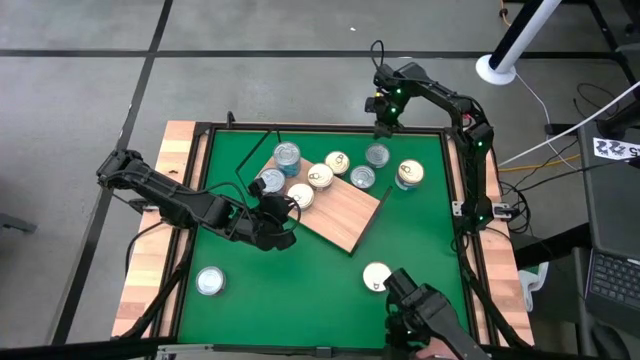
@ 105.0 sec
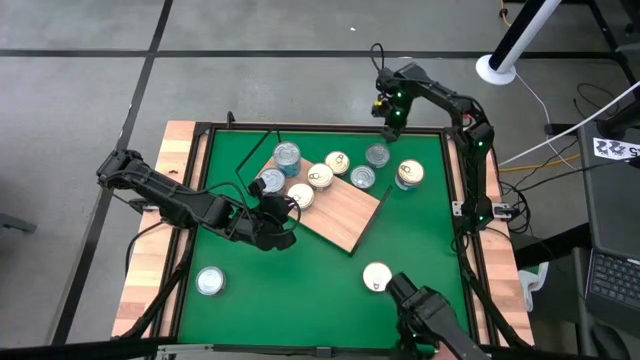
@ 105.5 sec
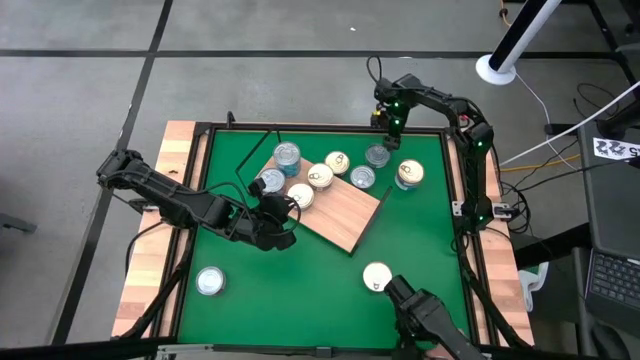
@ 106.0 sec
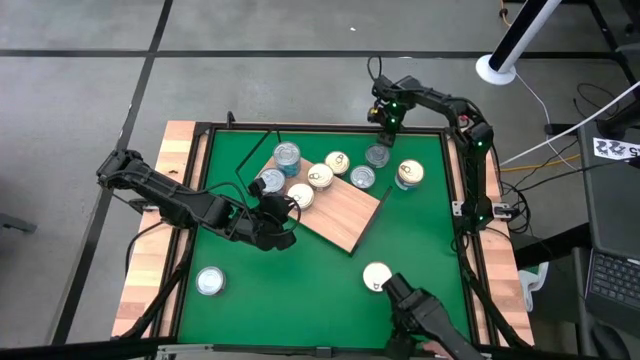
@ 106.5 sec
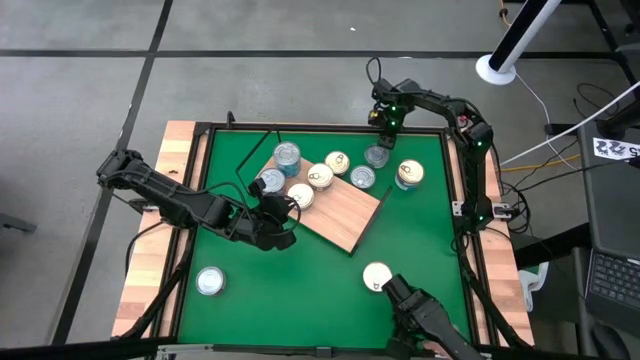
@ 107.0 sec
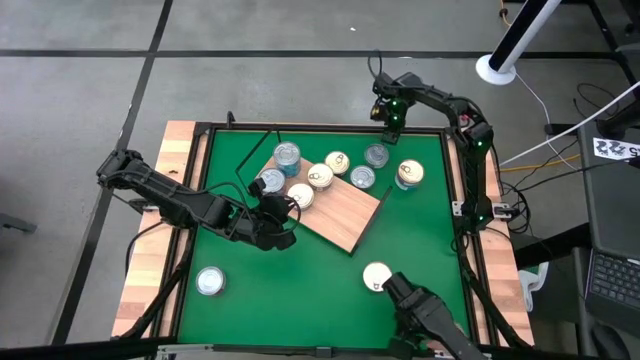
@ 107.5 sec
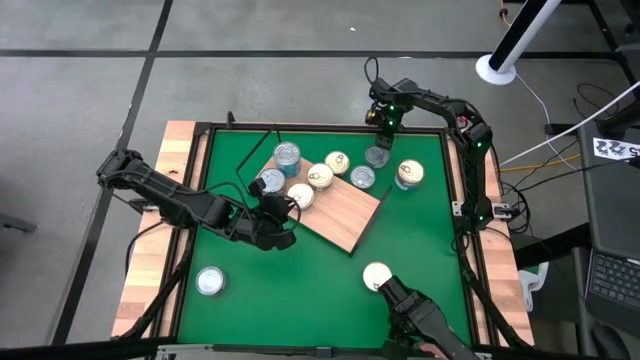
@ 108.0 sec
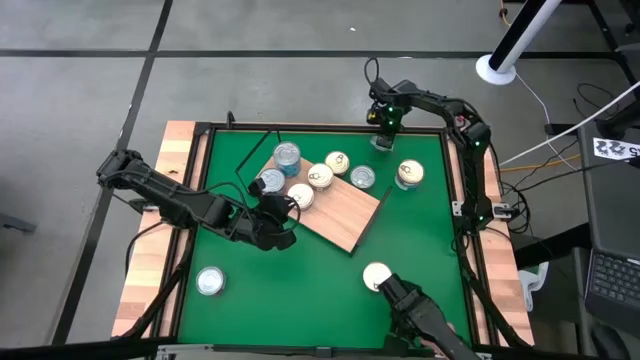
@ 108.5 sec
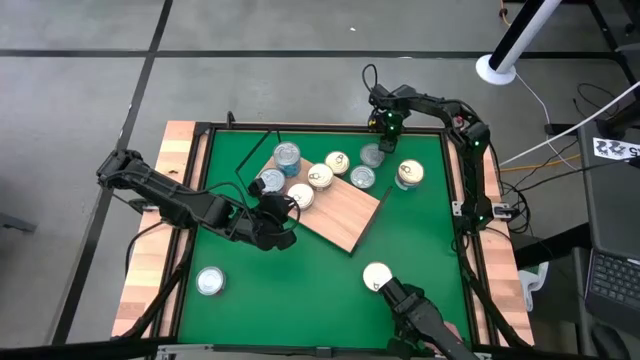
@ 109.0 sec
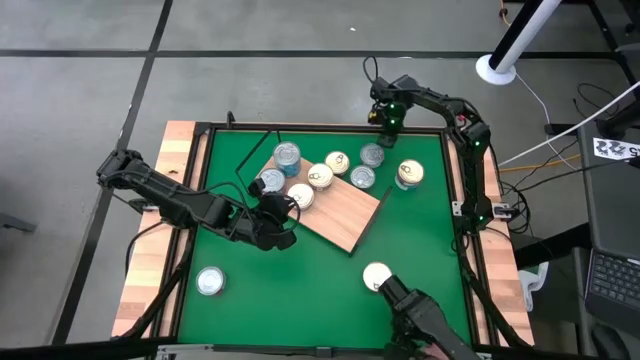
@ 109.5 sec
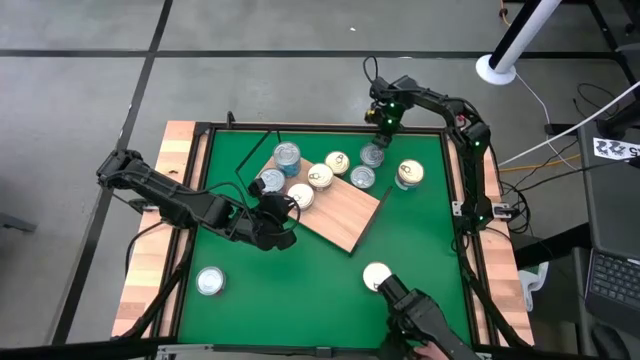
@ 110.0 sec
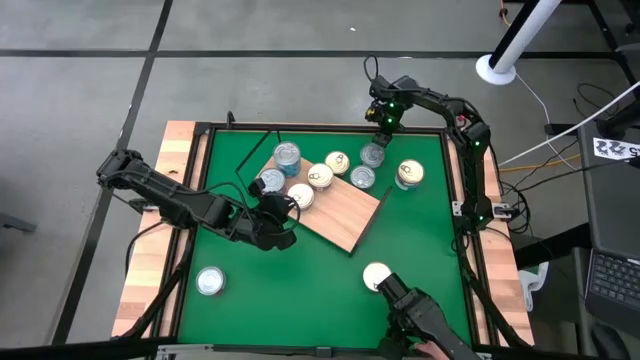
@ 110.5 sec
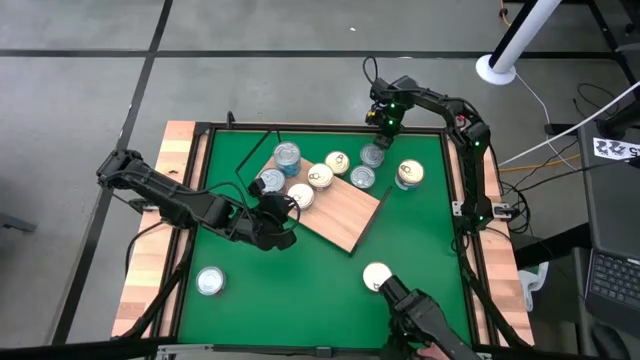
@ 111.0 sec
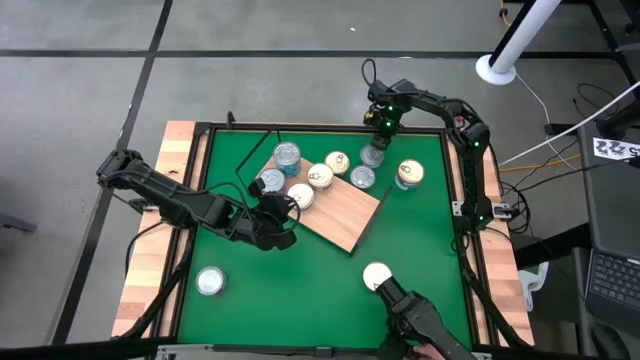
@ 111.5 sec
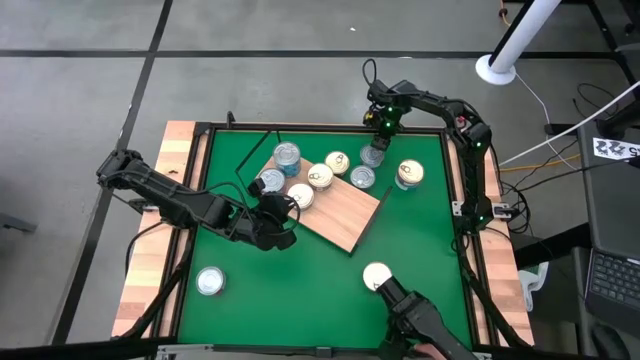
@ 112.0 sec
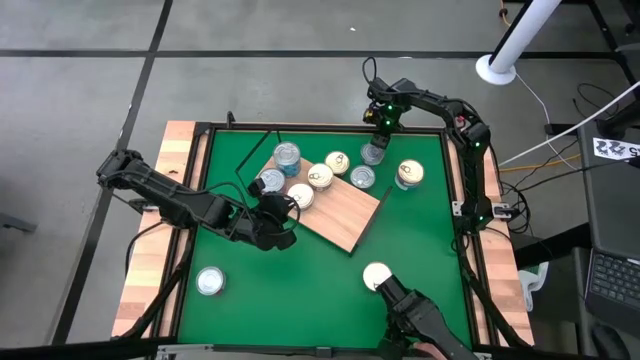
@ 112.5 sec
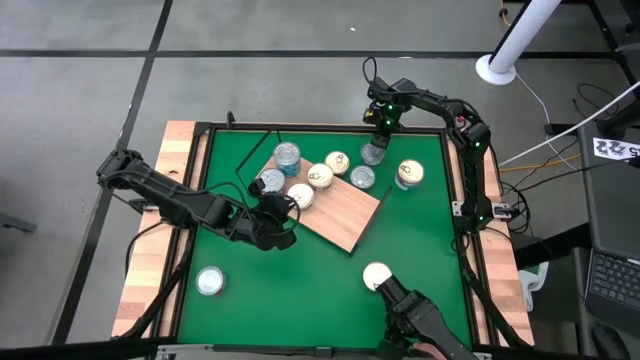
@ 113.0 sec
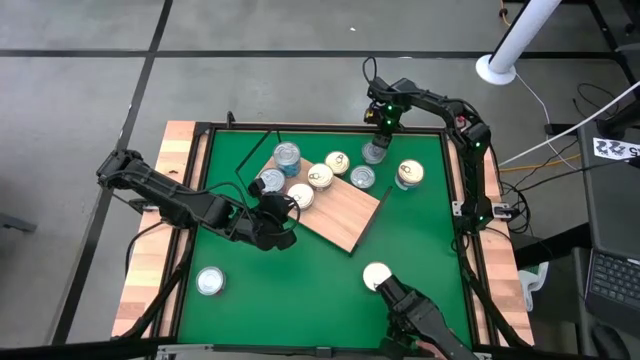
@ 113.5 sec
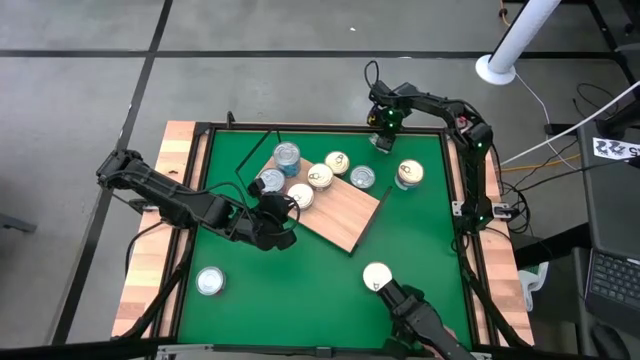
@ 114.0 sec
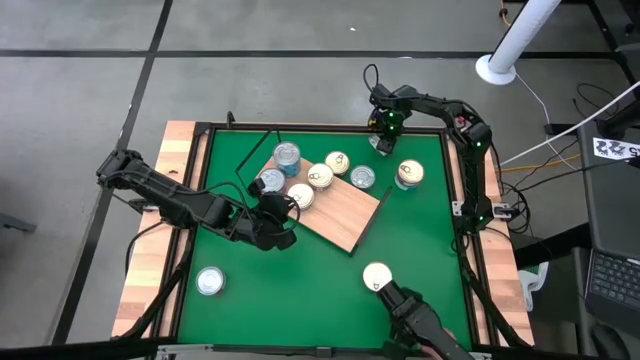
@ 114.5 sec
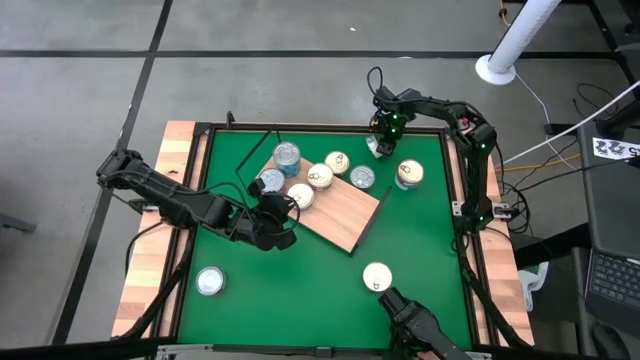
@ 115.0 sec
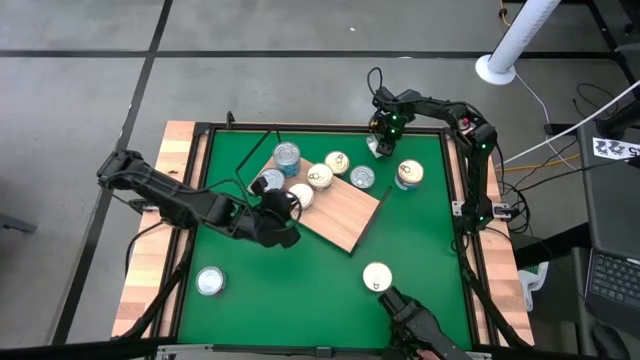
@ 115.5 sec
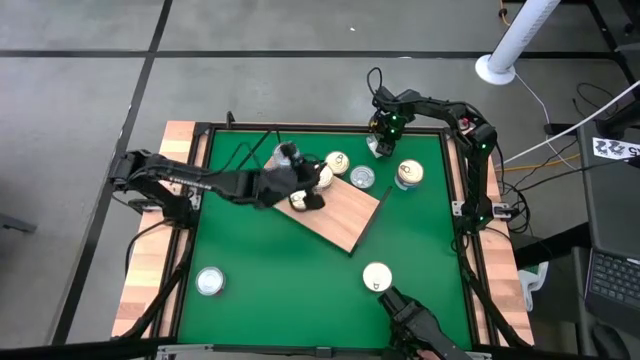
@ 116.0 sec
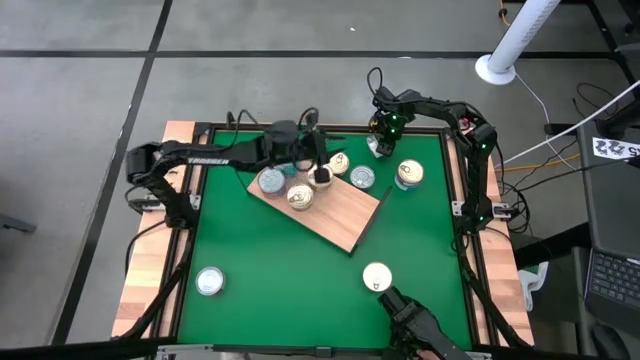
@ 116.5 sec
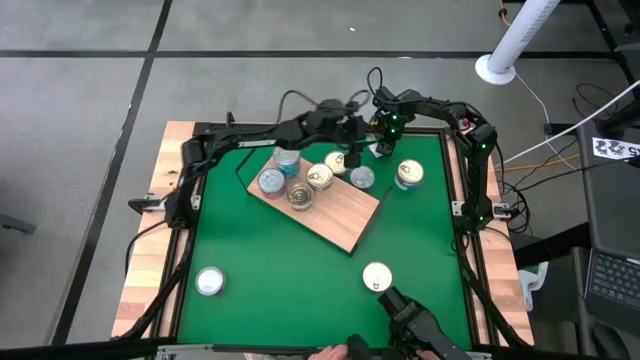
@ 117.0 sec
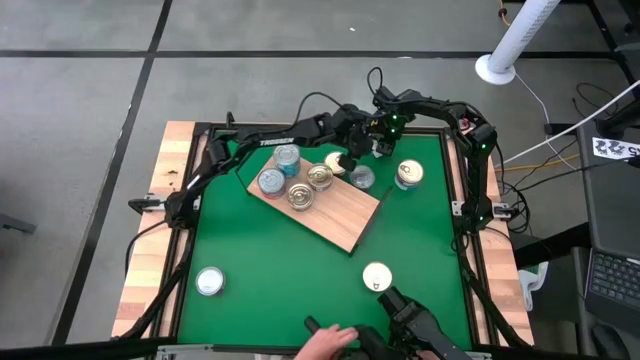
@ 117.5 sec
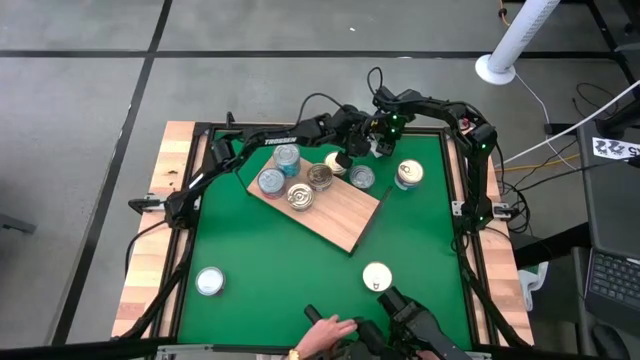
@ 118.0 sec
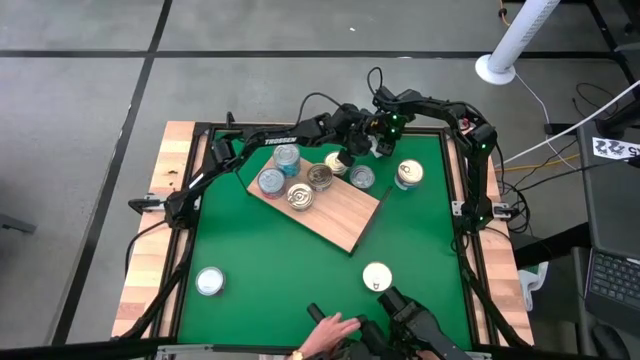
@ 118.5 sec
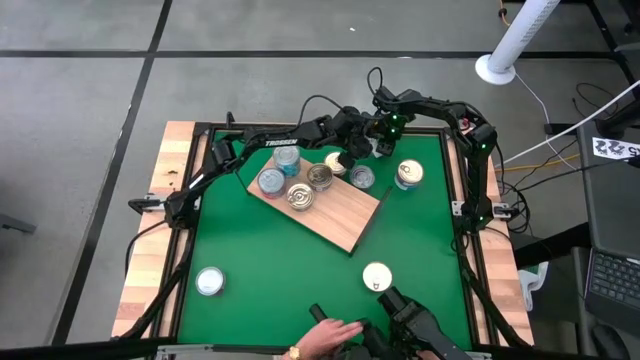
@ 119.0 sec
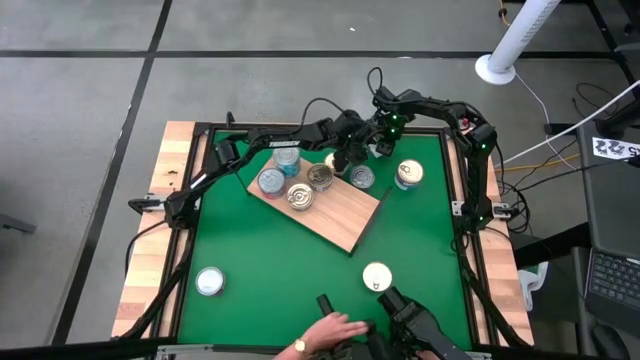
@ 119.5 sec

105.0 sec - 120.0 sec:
Task: Stack canned seafood by type on shelf
Put the green can on the shelf

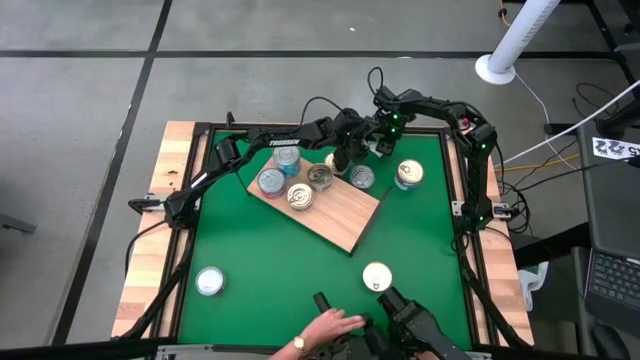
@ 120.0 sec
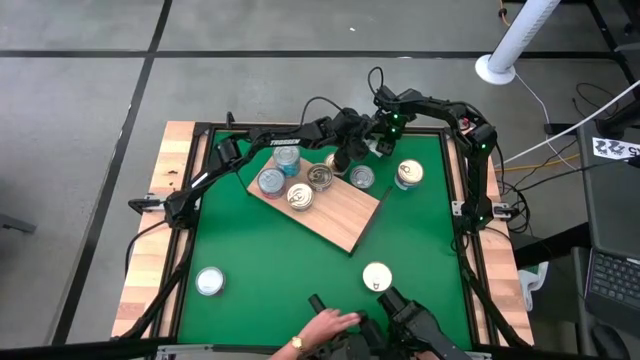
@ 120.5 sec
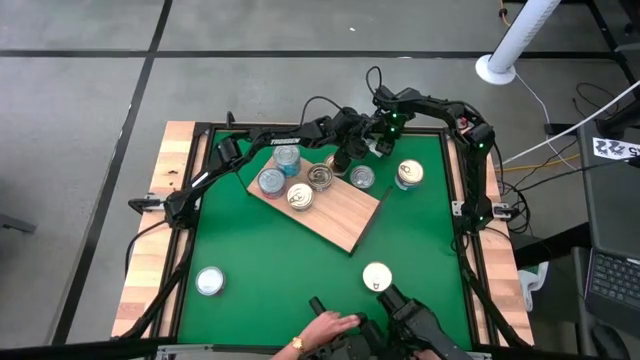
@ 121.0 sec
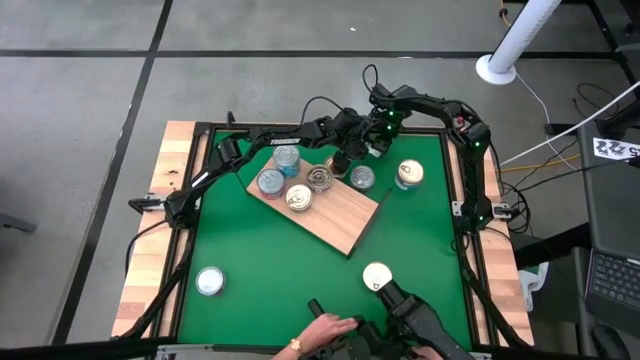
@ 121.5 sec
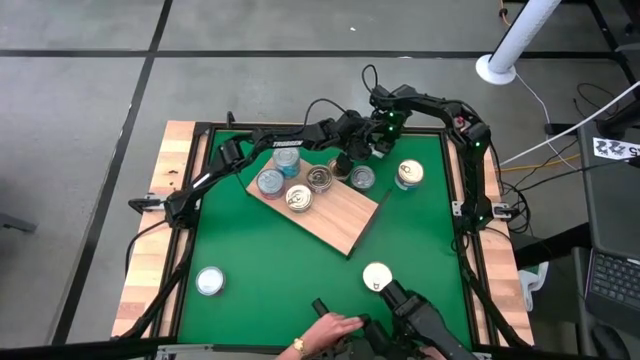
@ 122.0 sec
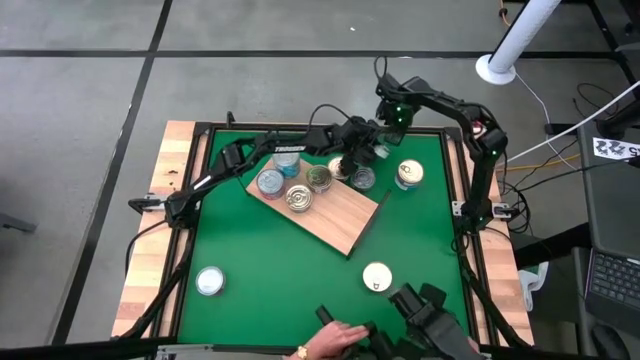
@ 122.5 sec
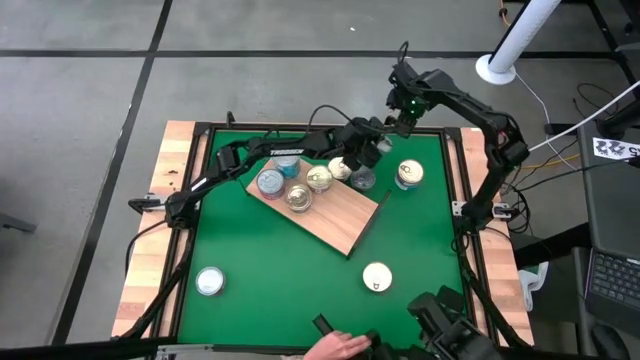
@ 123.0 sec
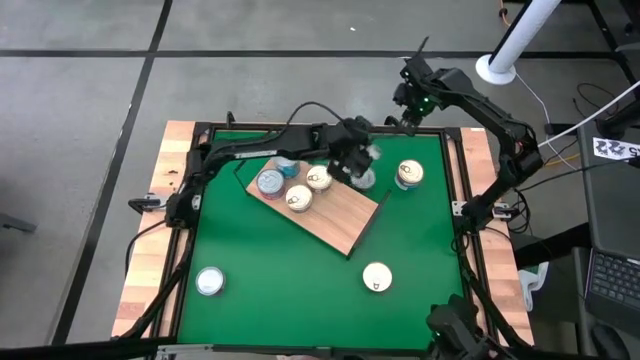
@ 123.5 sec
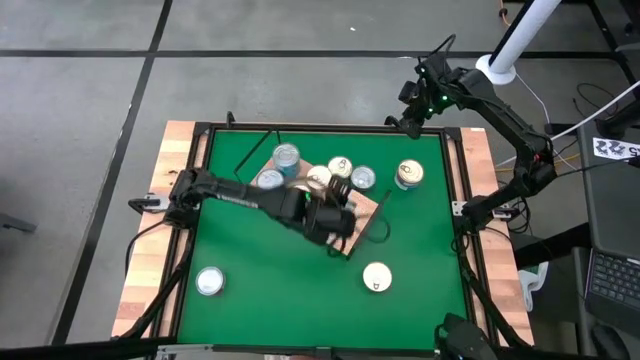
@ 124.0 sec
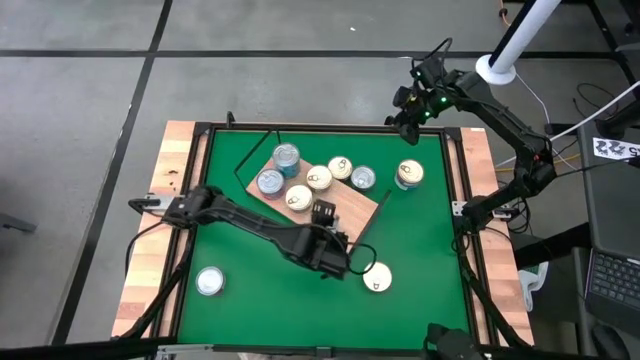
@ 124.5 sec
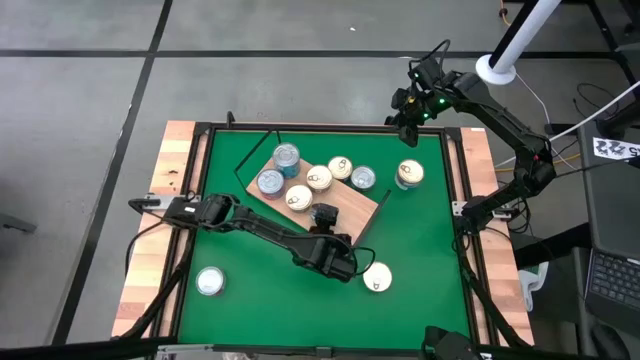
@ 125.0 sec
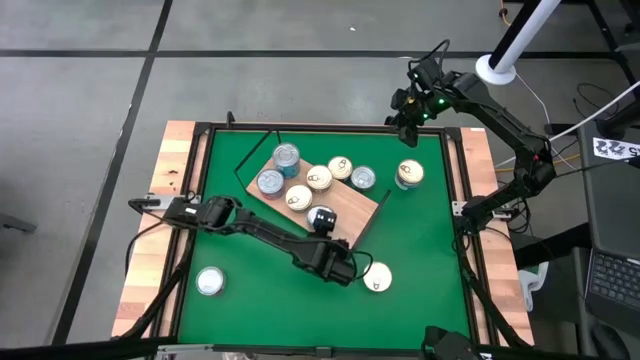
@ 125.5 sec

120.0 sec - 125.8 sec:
Put the green can on the shelf
